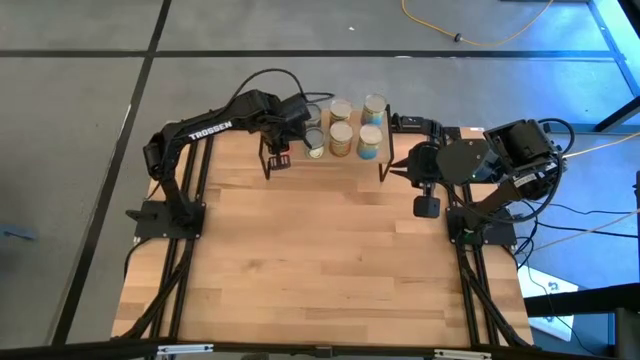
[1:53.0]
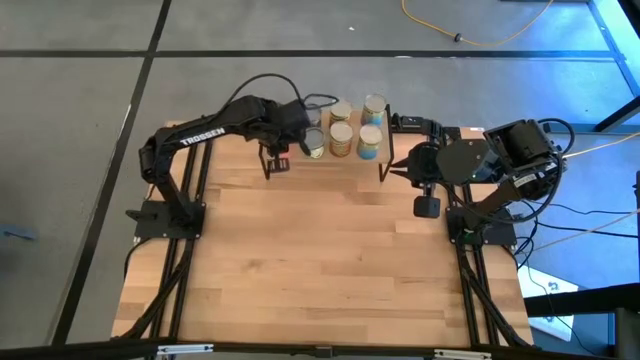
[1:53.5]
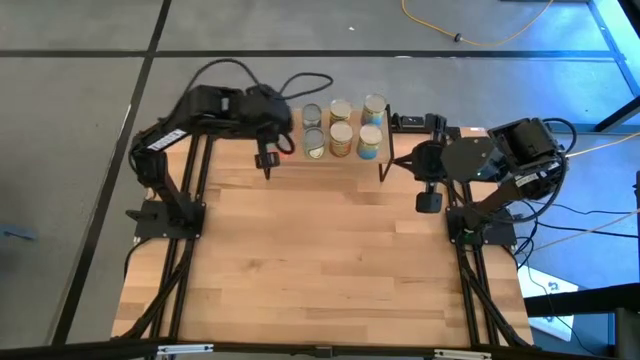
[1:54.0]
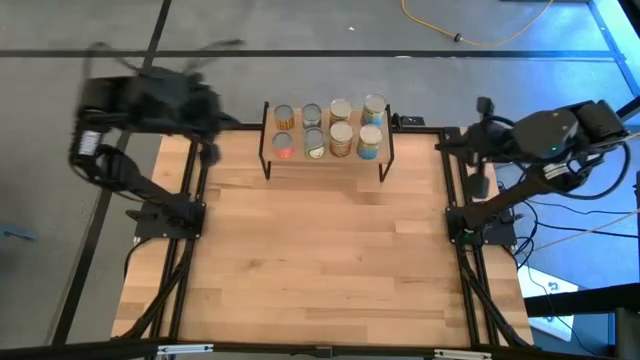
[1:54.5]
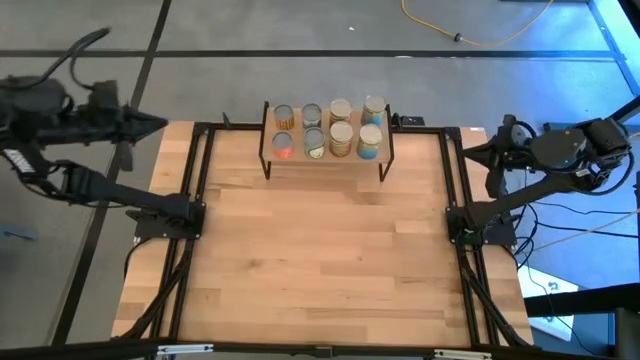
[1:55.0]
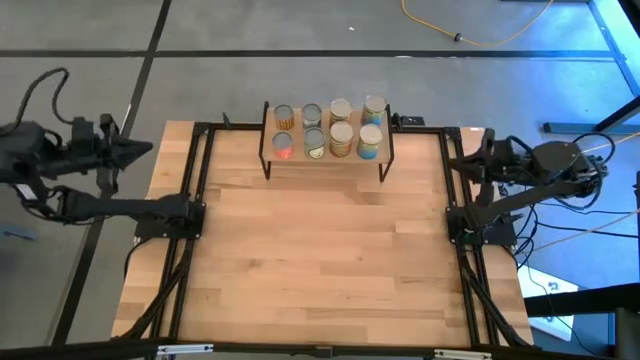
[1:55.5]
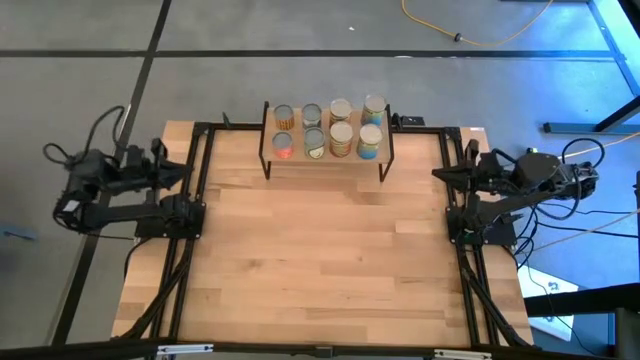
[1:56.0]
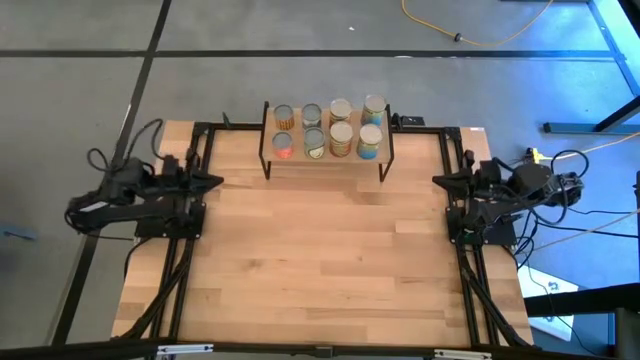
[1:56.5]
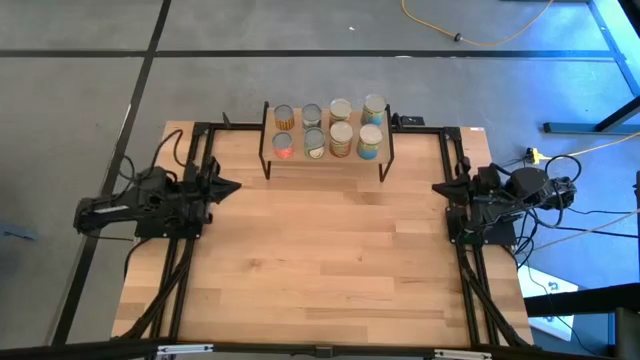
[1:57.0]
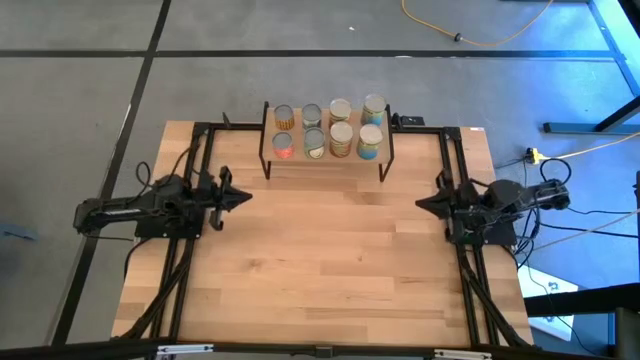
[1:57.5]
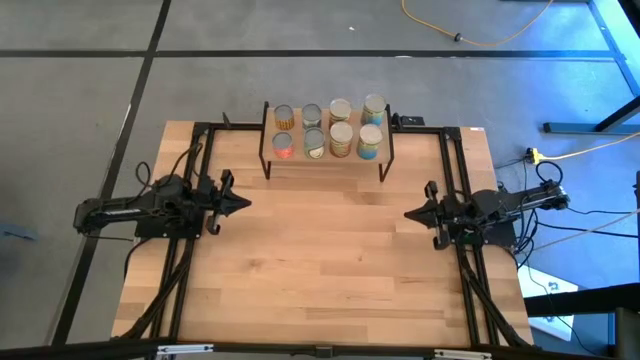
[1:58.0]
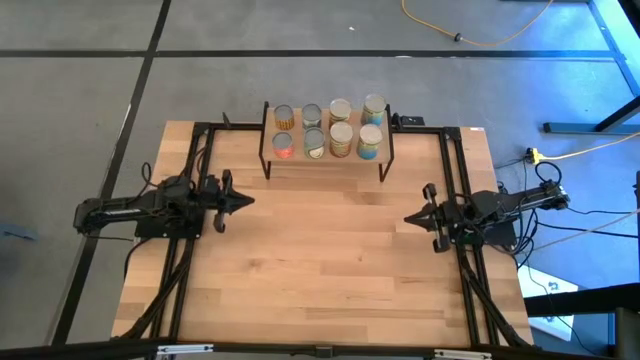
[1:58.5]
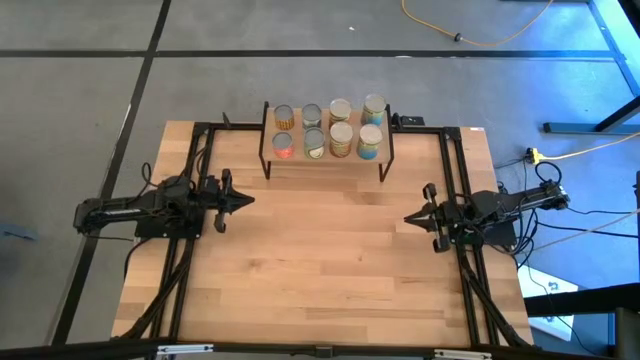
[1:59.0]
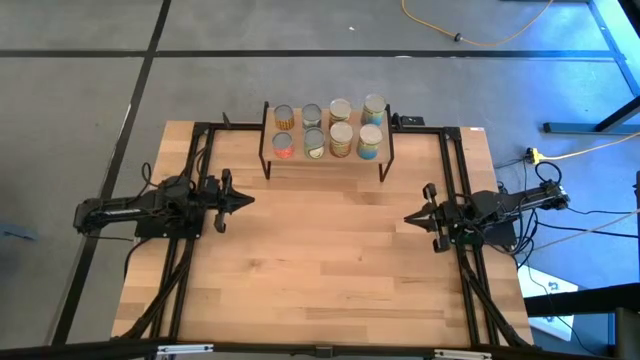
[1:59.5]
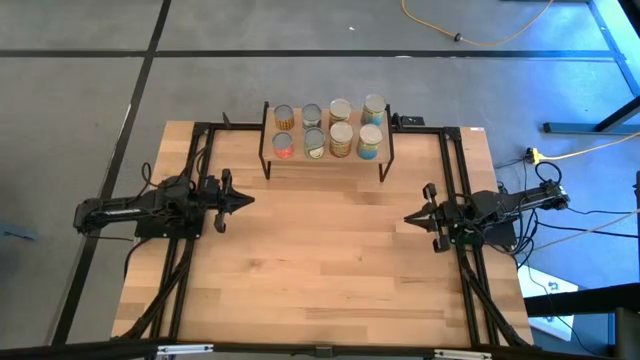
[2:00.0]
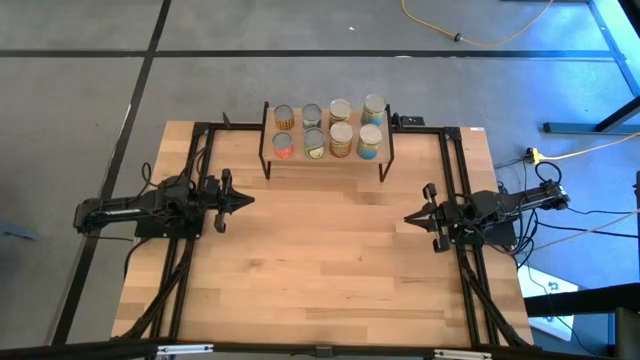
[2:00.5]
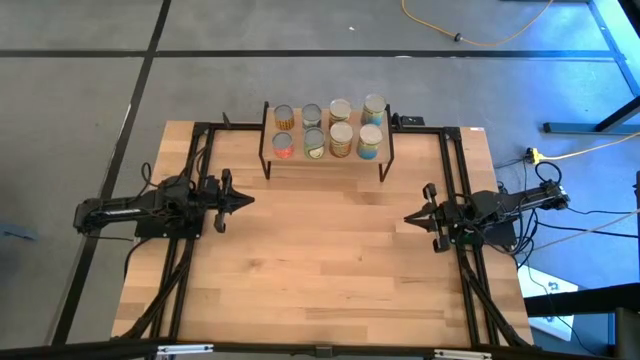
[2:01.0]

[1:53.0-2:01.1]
Task: Pick and place cans onto a shelf
Return to Home Position

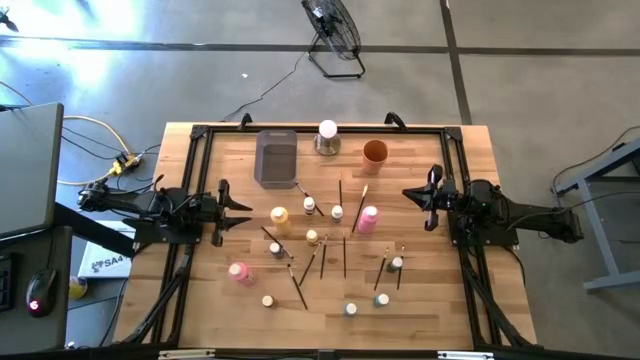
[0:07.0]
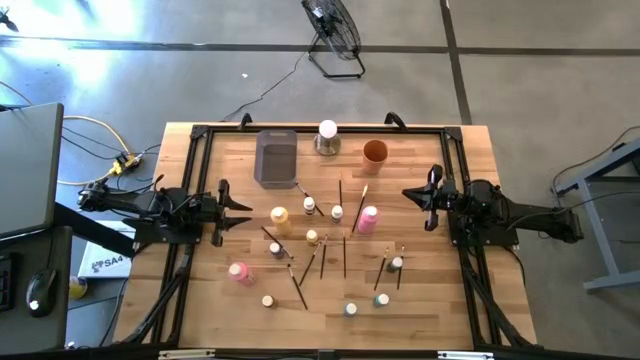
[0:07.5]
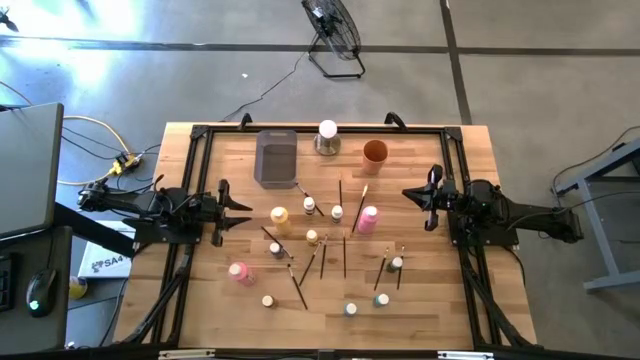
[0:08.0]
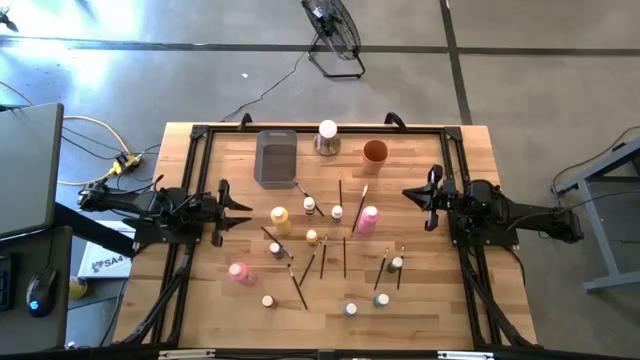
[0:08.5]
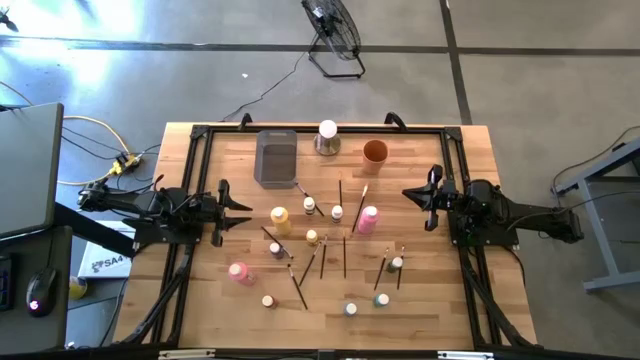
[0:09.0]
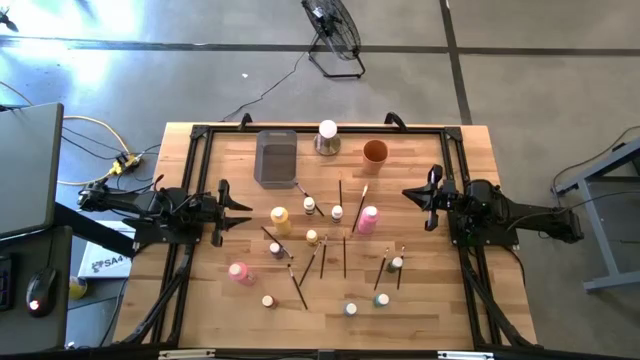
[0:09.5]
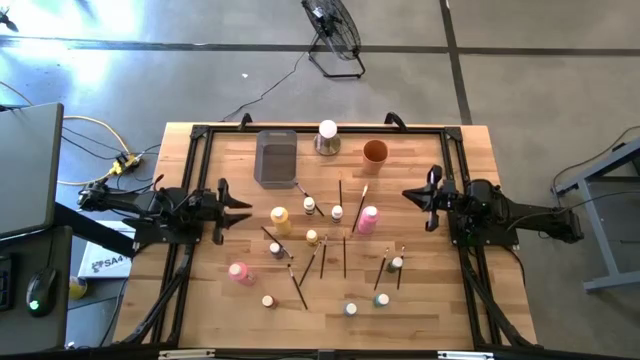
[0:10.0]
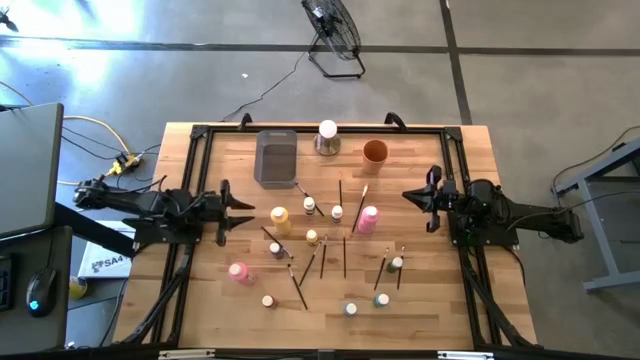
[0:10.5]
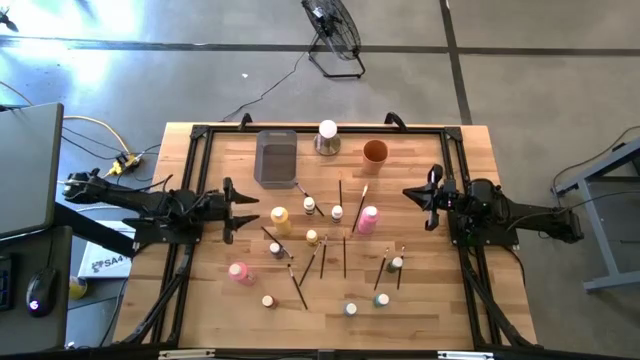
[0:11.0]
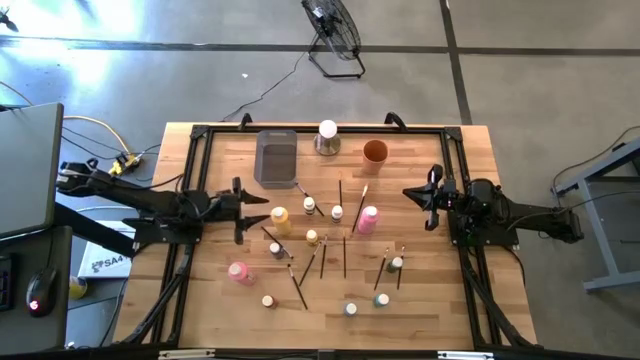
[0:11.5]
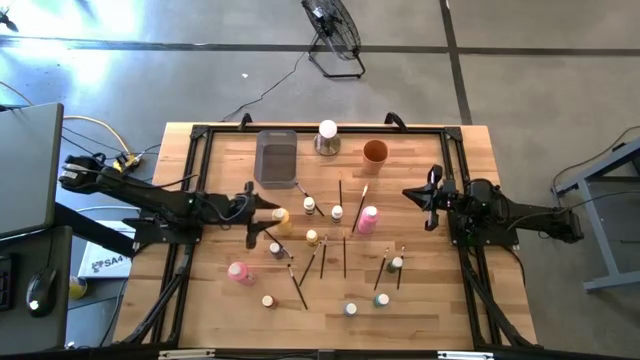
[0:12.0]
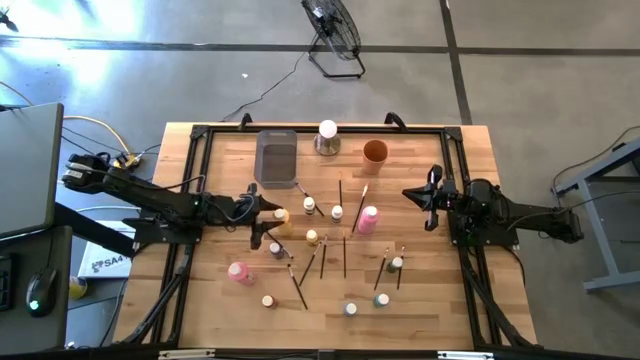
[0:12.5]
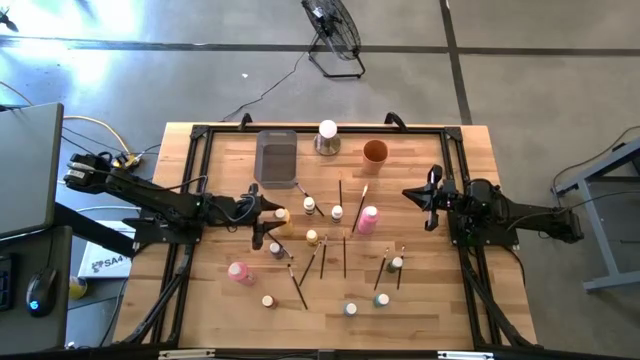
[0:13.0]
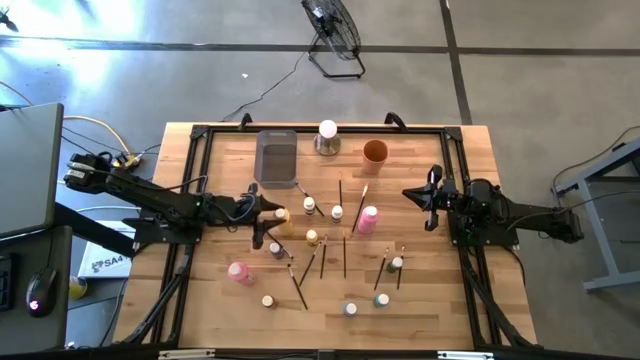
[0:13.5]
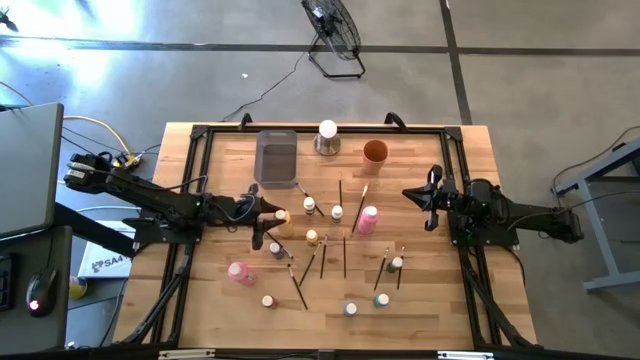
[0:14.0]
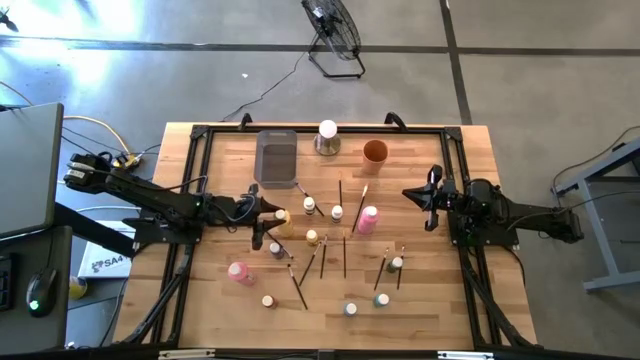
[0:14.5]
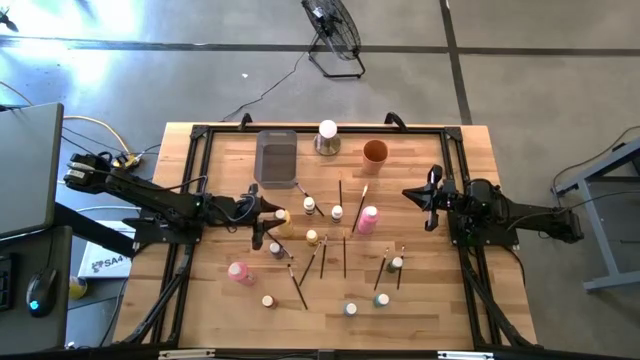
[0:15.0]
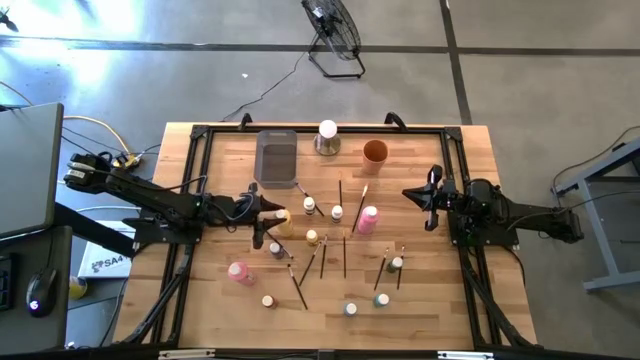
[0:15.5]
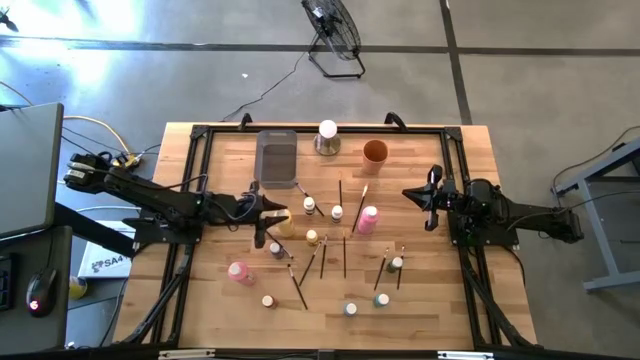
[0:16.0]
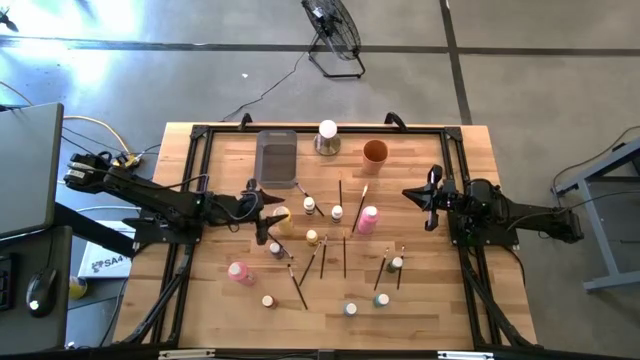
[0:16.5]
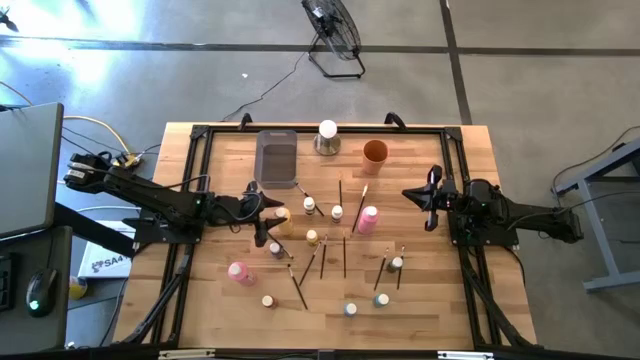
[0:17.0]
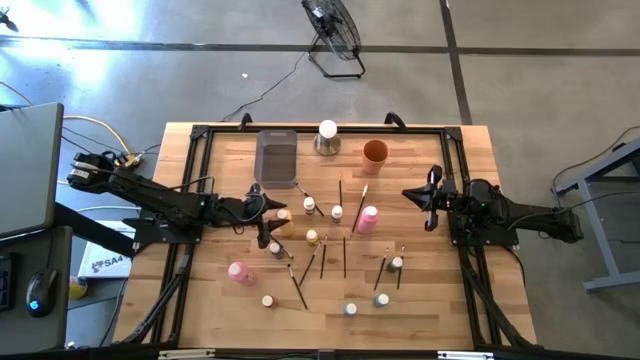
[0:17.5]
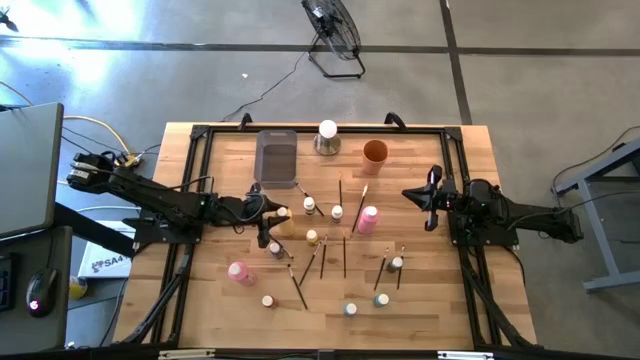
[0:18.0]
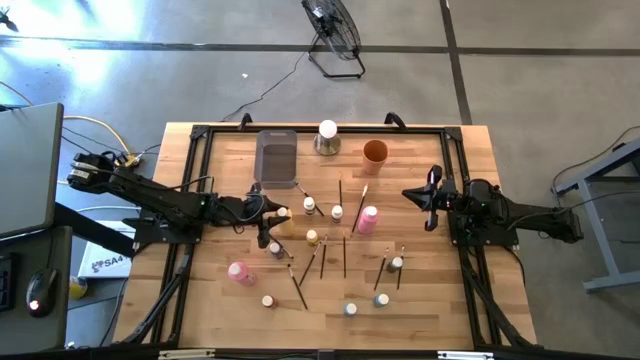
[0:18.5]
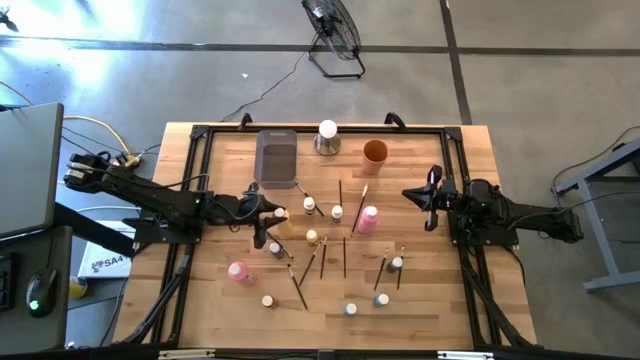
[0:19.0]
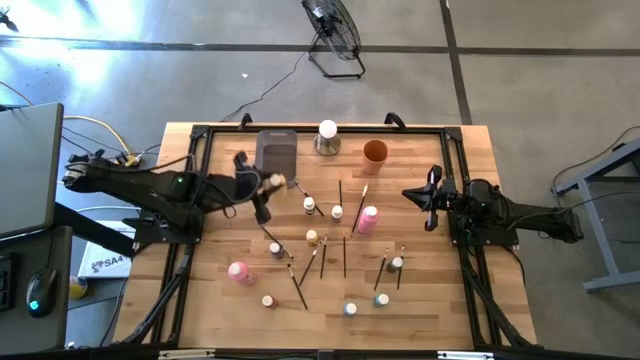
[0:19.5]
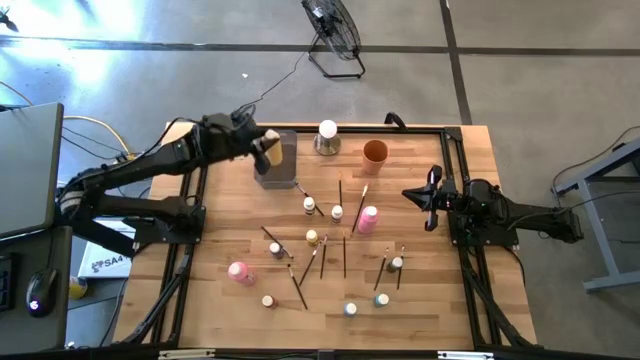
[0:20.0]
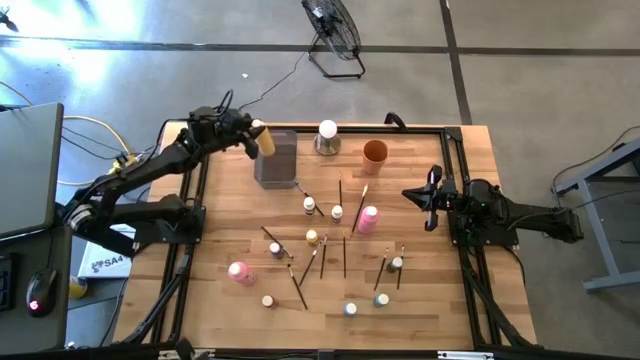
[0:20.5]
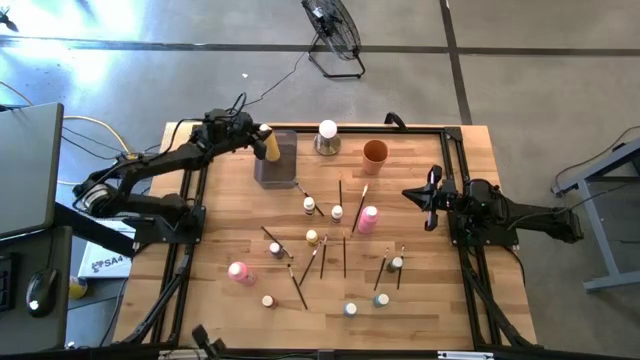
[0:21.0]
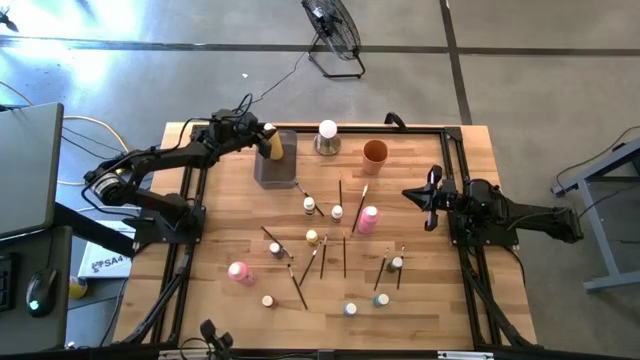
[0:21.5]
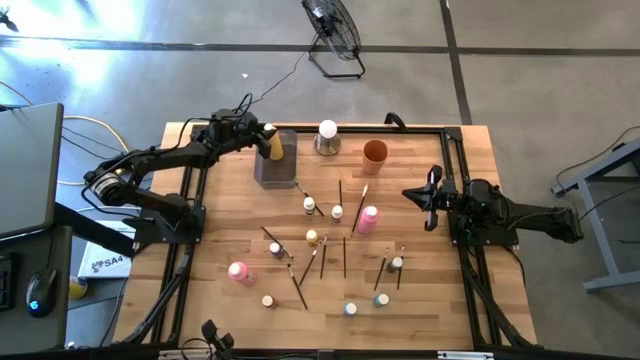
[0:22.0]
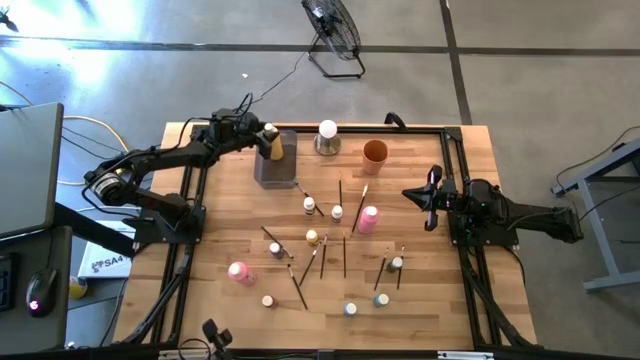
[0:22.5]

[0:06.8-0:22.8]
Task: Pick & Place Paint Supplies
Put the large yellow paint bottle into the gray bin
